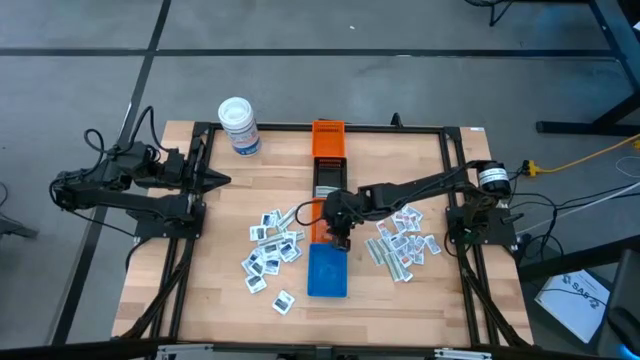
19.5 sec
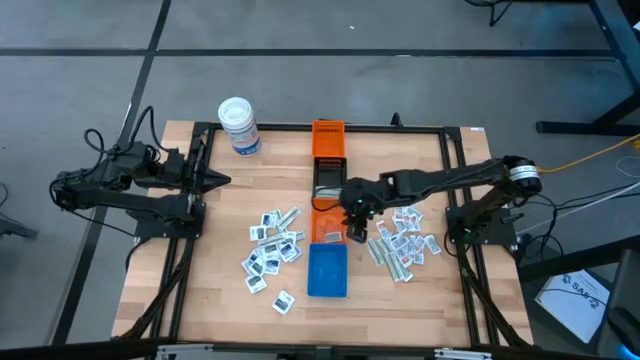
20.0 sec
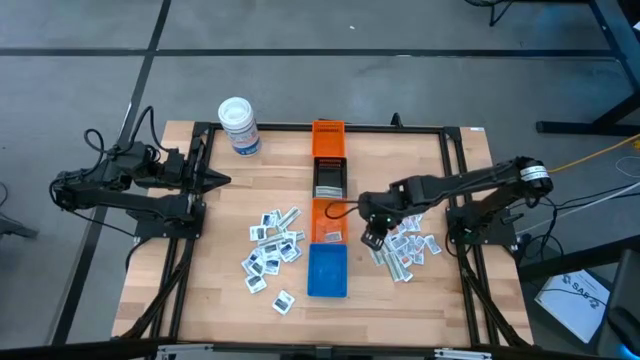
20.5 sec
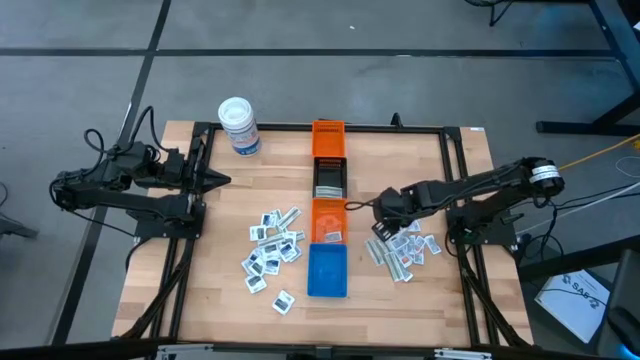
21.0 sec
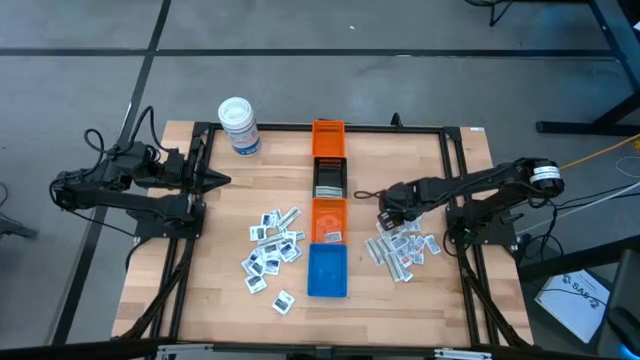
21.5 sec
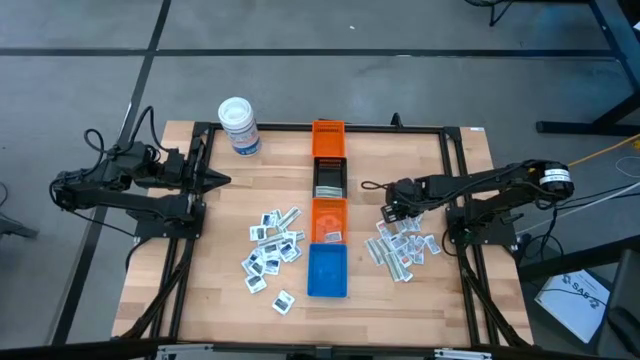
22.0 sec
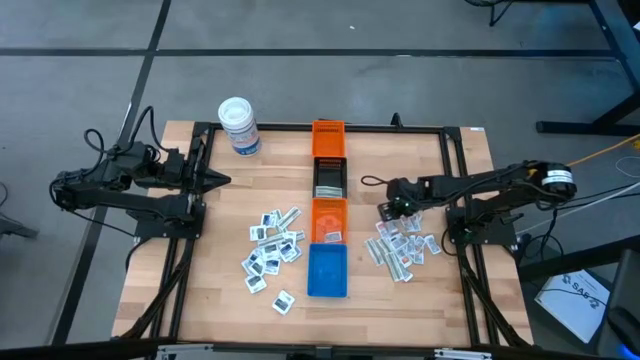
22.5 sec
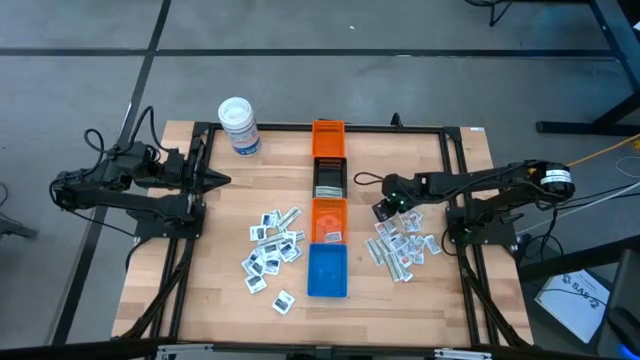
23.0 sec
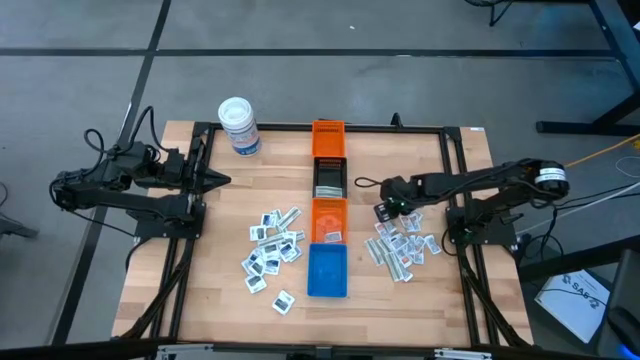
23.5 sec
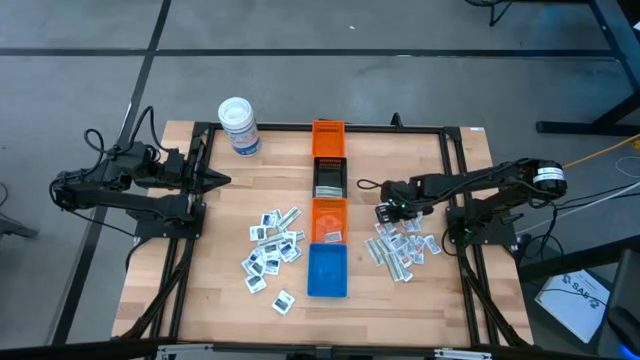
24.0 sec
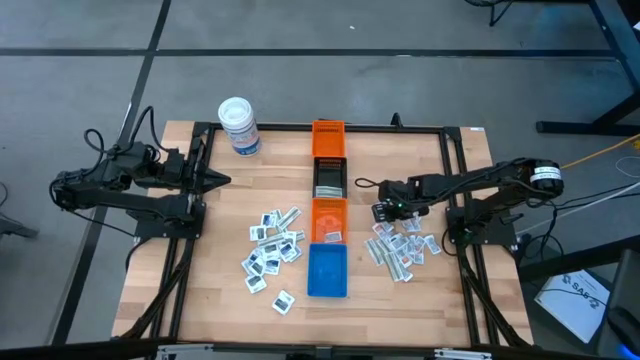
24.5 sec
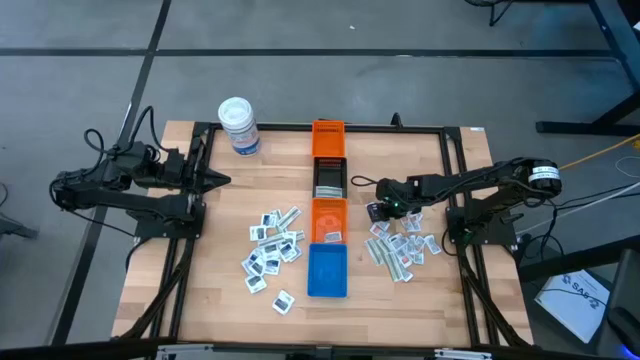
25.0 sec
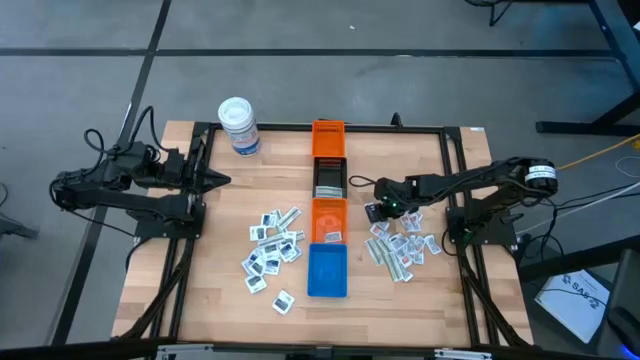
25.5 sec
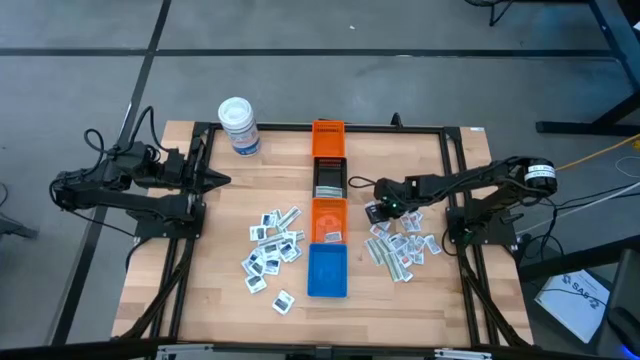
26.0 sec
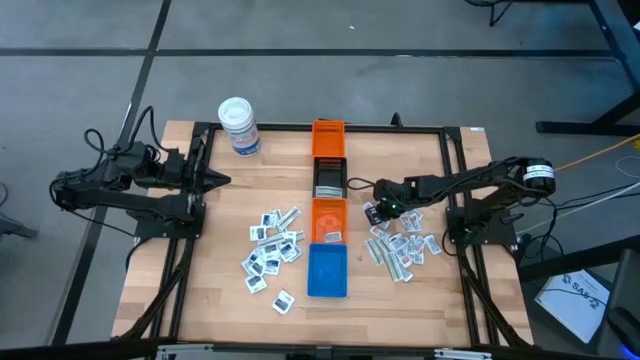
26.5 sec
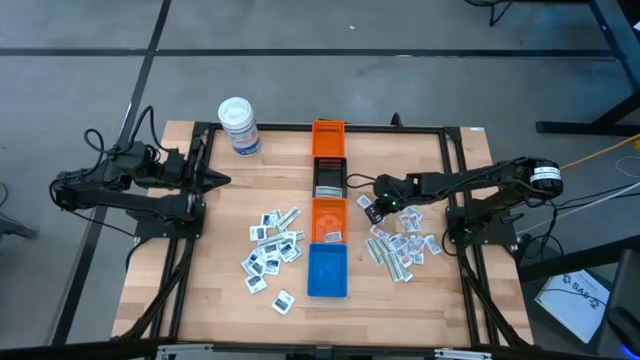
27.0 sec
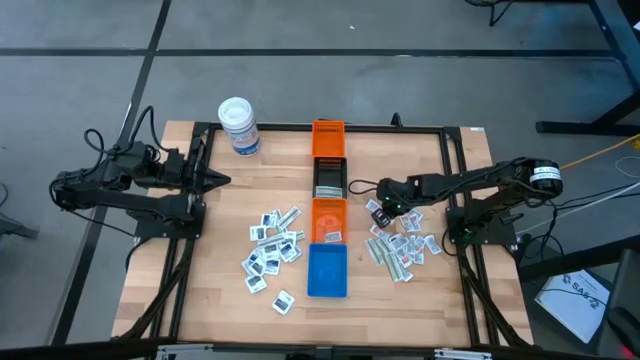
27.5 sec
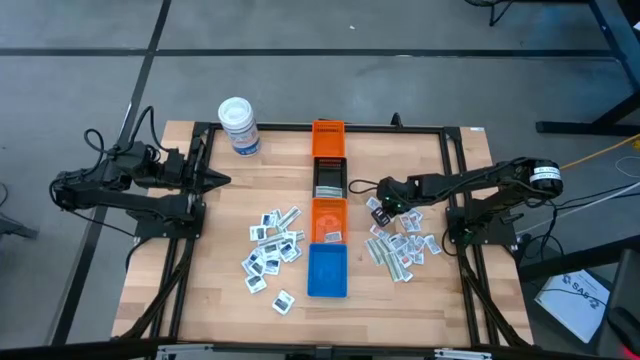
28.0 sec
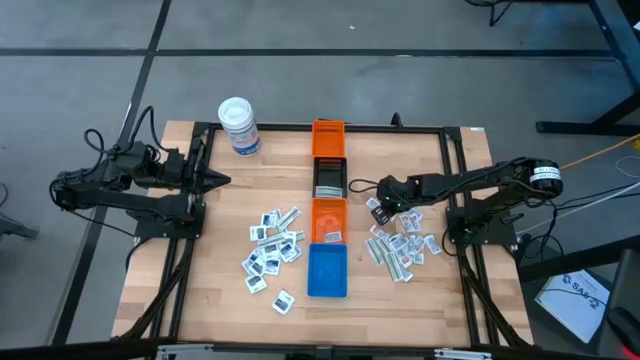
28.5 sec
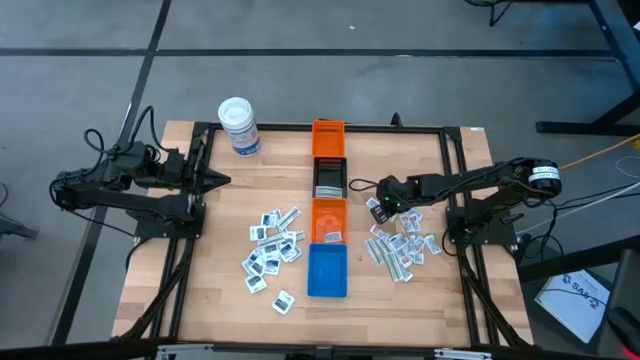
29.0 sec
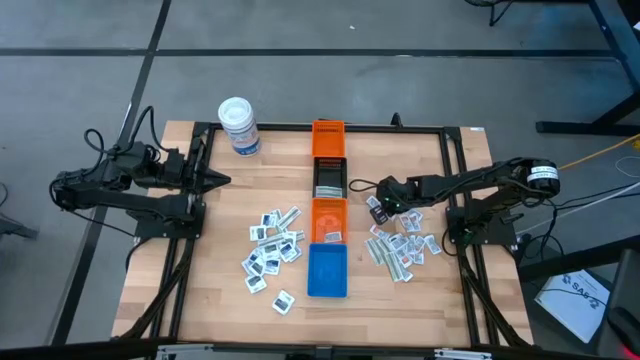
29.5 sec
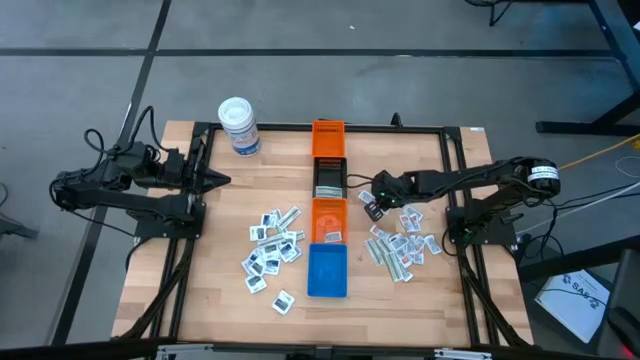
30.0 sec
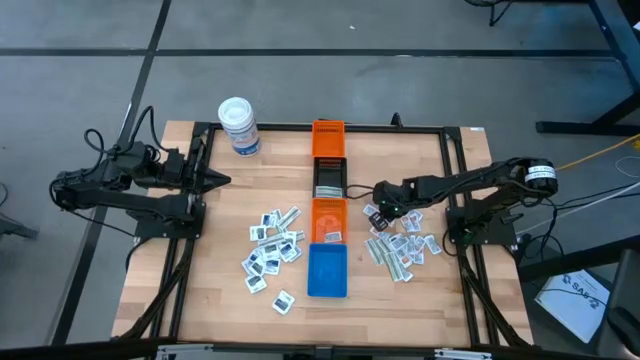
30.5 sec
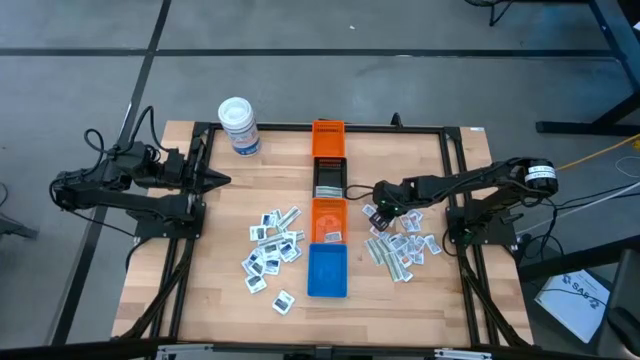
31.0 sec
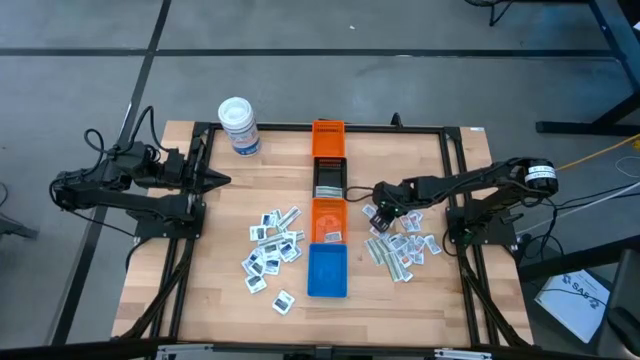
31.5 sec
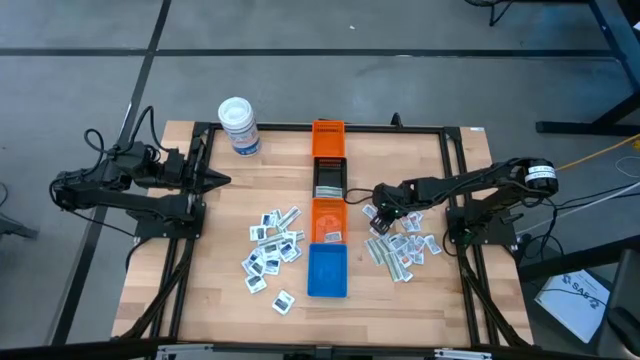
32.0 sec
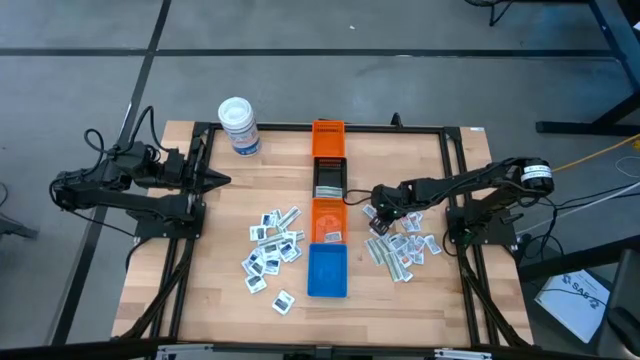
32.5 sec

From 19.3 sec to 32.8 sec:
Task: Pick & Place First Aid Supplies
Put the orange ointment pack into the bottom orange bin

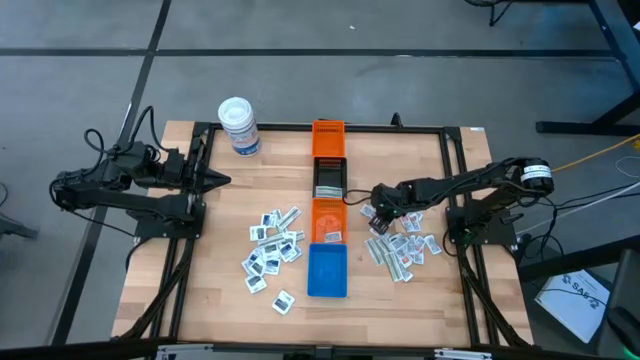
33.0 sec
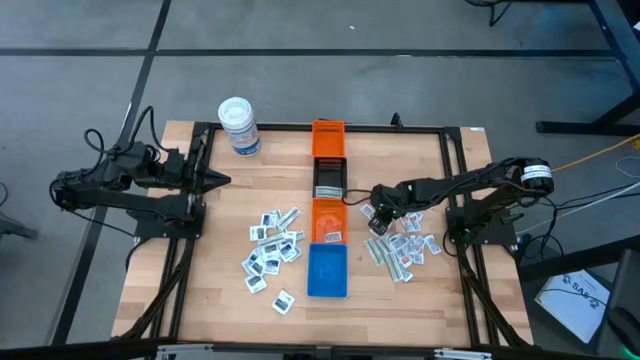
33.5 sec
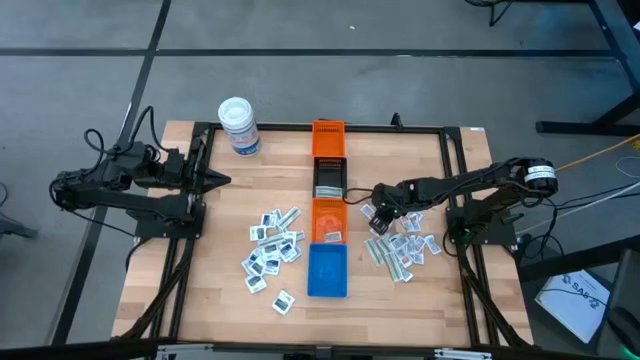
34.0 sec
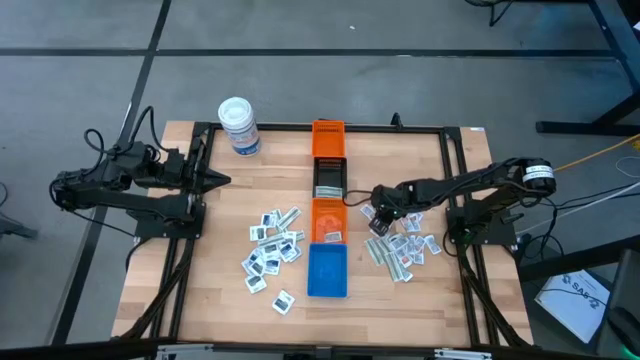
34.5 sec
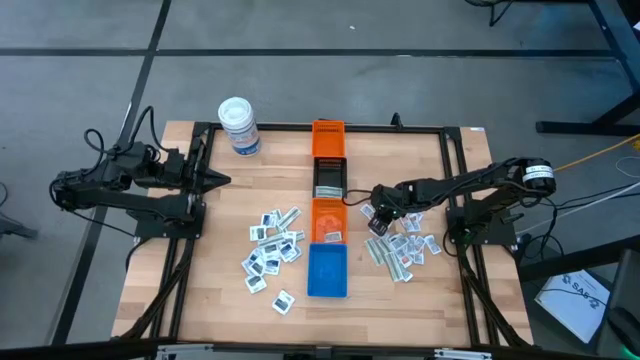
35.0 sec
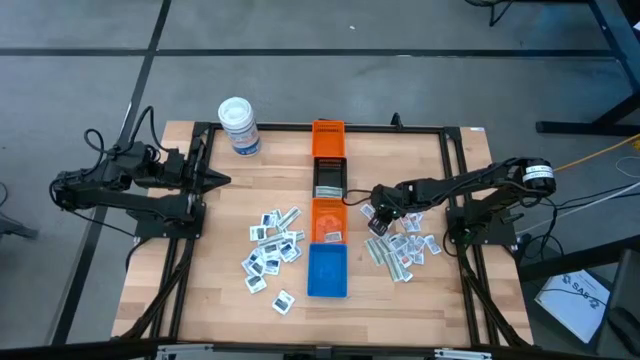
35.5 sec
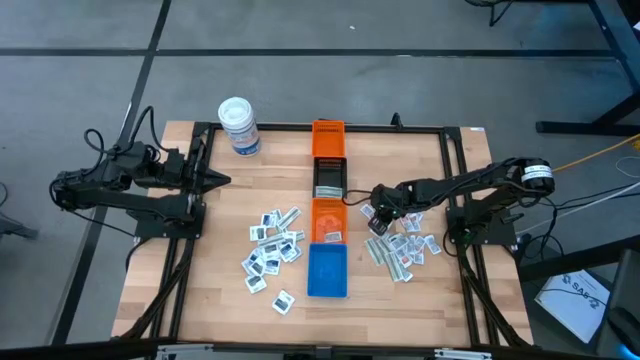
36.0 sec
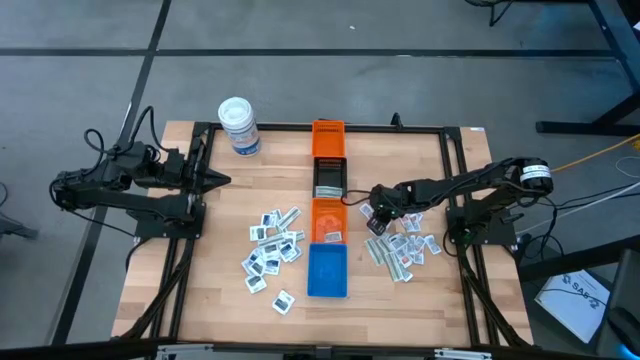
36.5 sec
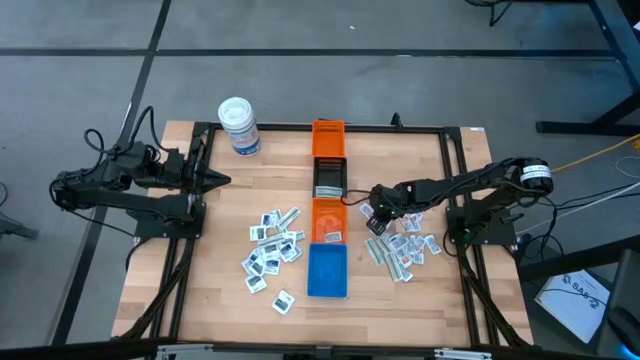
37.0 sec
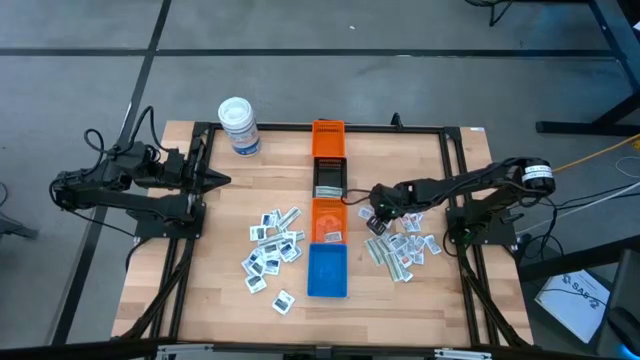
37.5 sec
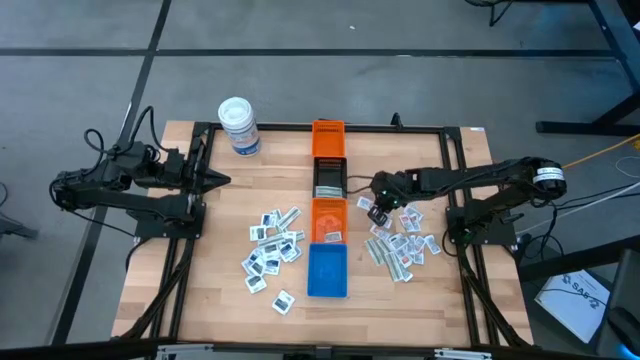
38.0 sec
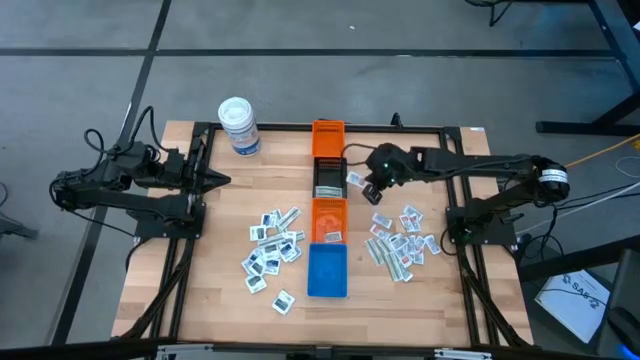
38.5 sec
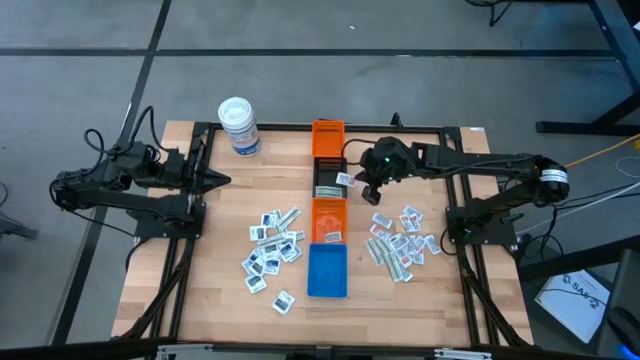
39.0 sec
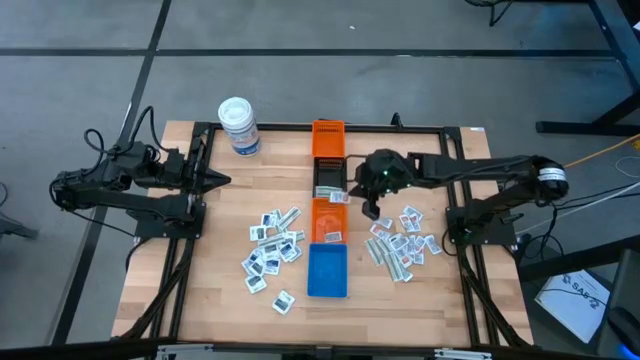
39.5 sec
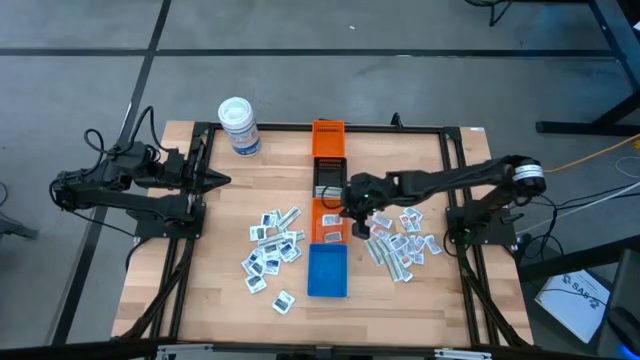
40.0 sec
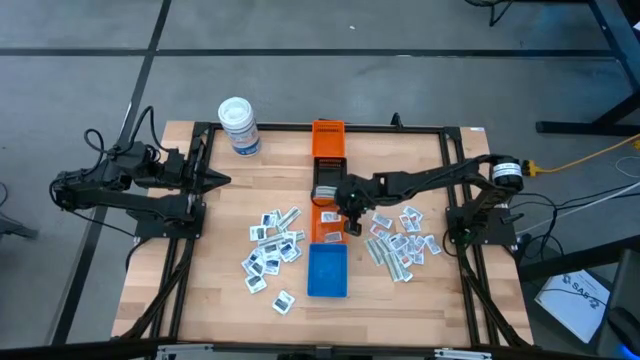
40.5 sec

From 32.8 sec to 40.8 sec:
Put the orange ointment pack into the bottom orange bin

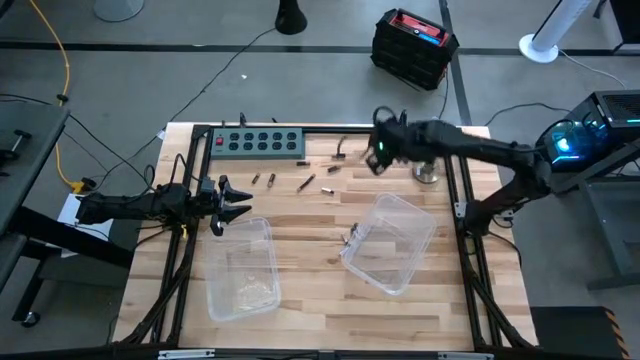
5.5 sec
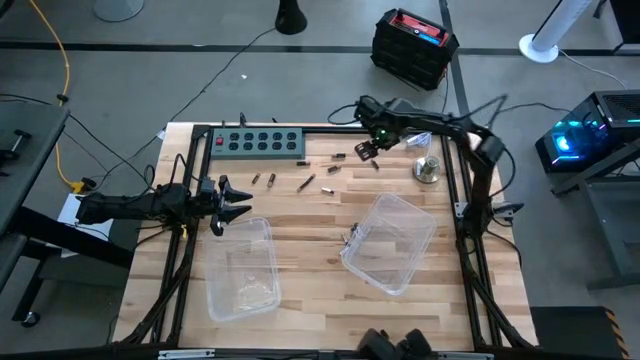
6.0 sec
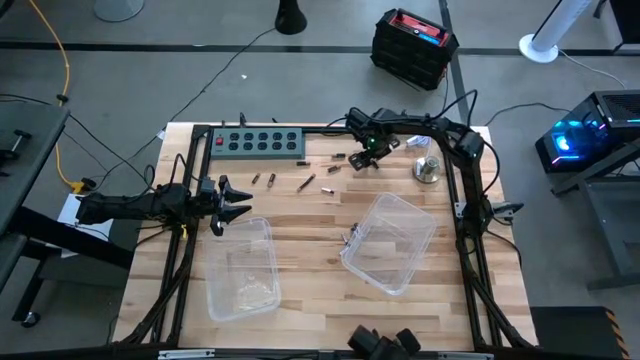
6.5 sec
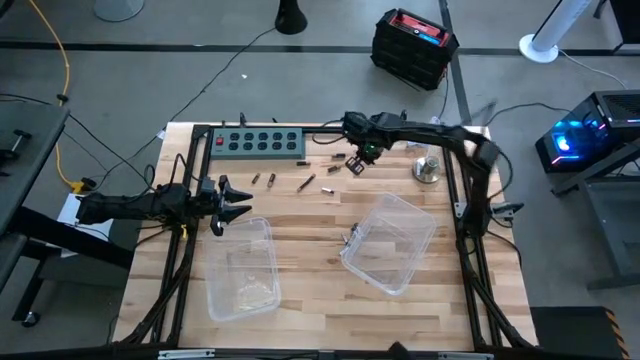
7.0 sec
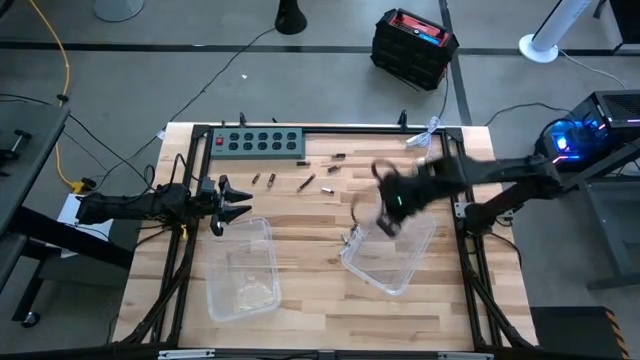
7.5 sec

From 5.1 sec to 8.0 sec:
Task: Sort batteries
Put the black battery into the right transparent bin
